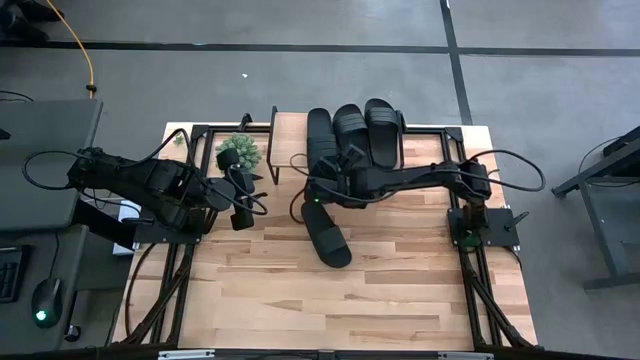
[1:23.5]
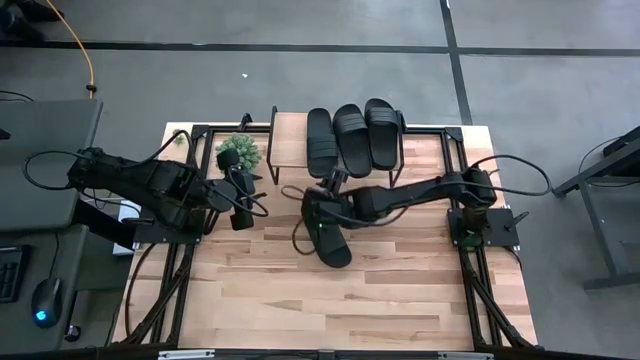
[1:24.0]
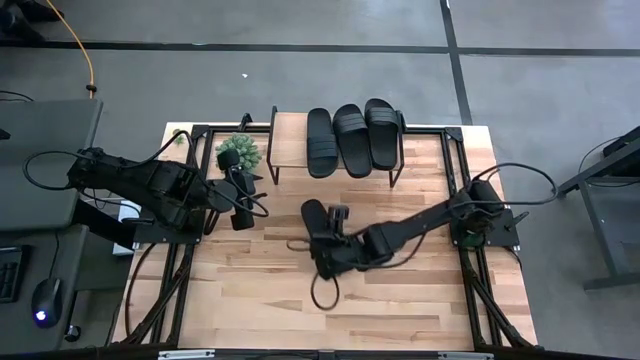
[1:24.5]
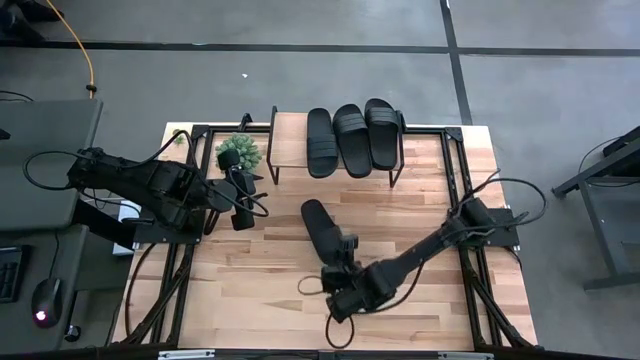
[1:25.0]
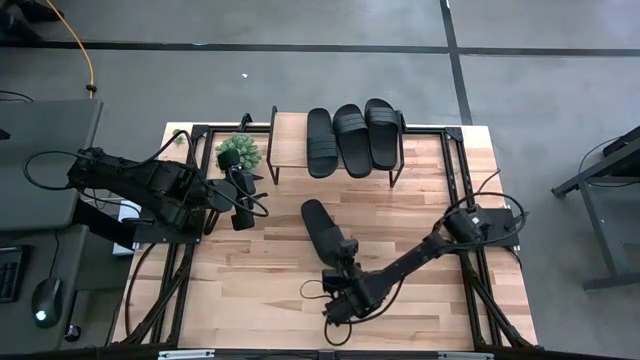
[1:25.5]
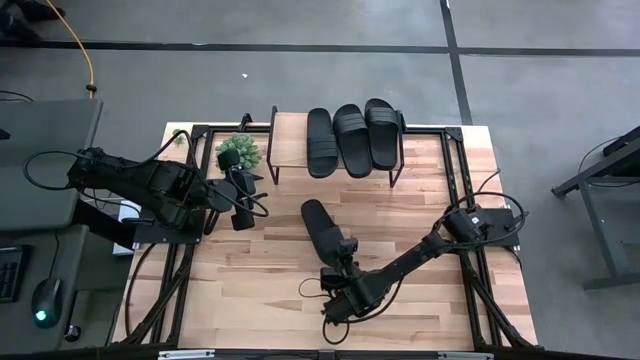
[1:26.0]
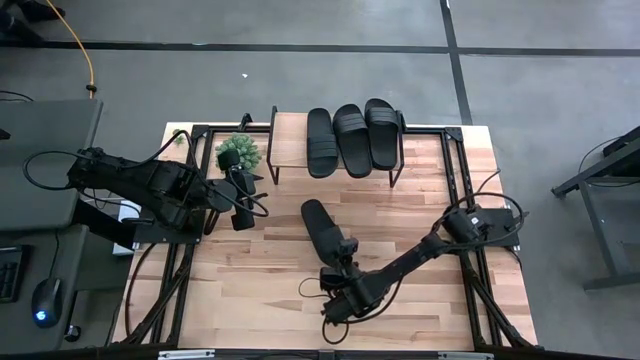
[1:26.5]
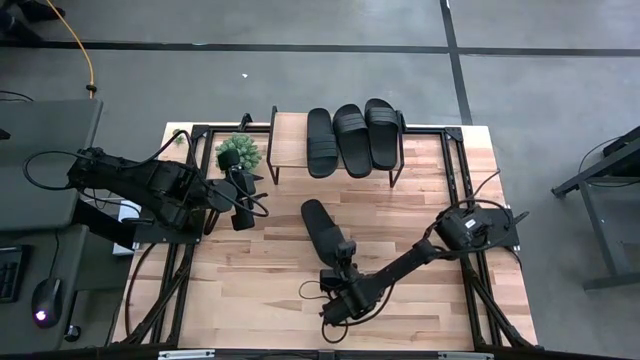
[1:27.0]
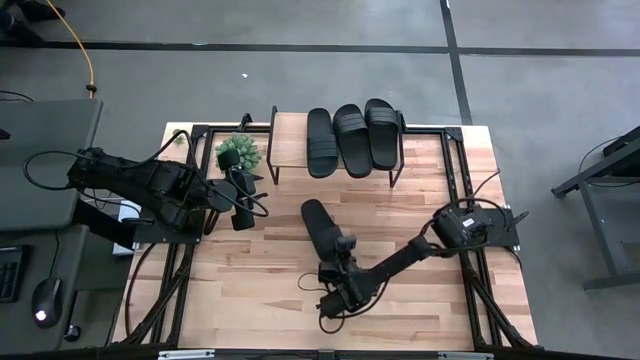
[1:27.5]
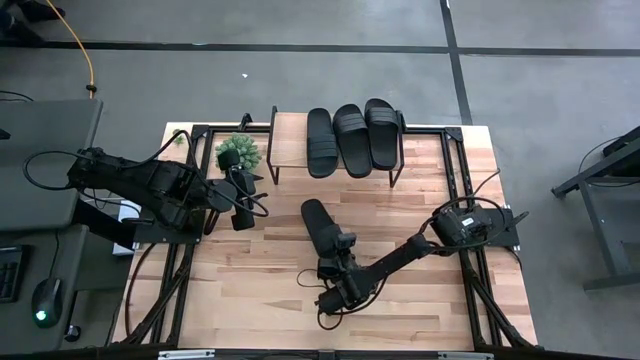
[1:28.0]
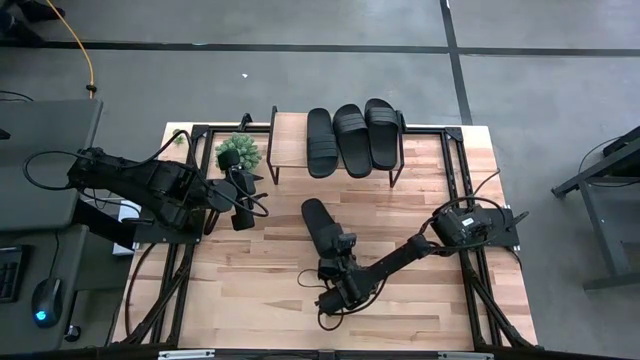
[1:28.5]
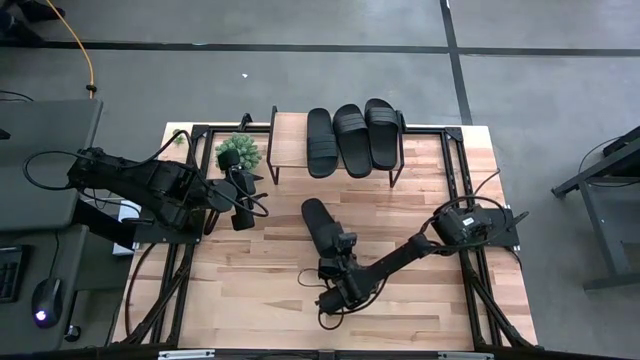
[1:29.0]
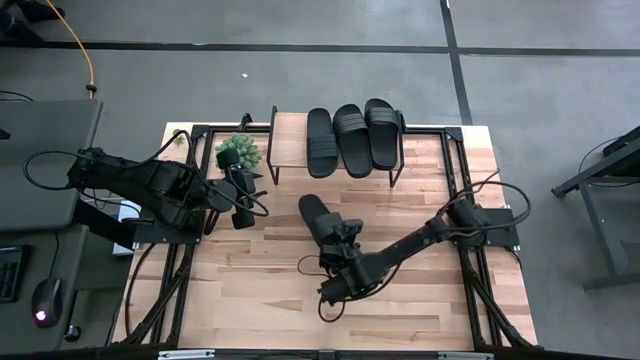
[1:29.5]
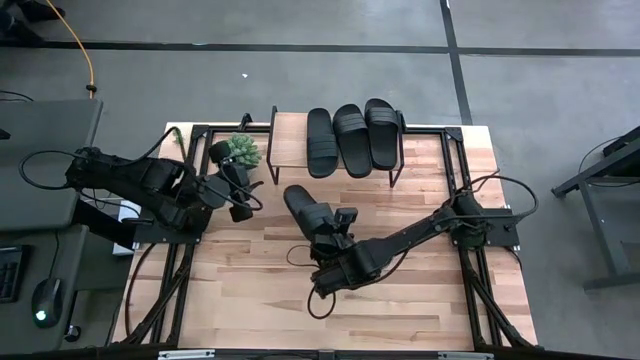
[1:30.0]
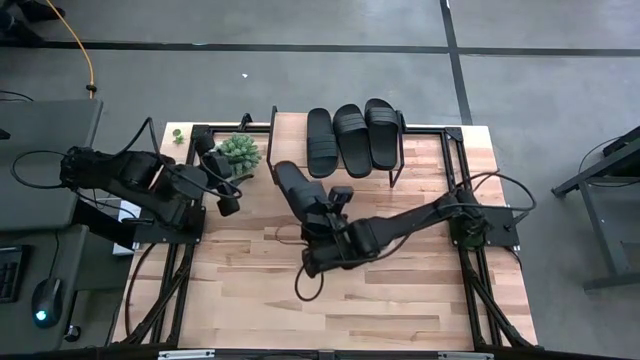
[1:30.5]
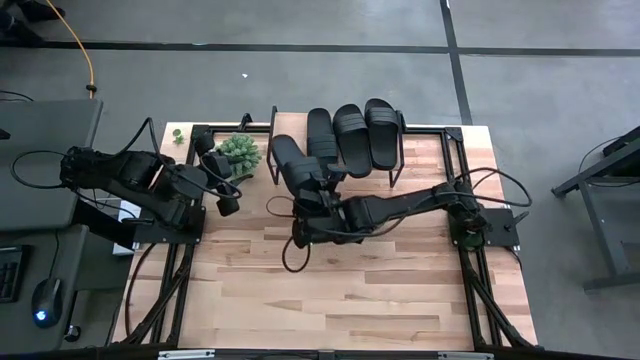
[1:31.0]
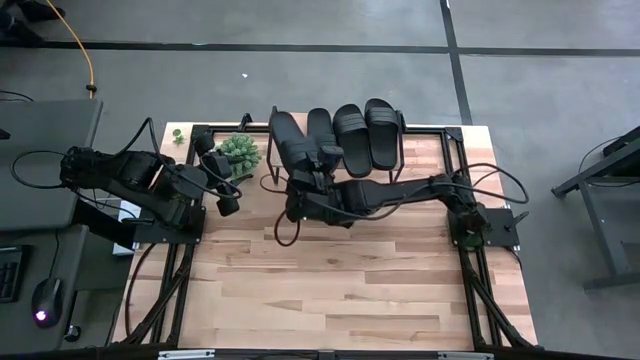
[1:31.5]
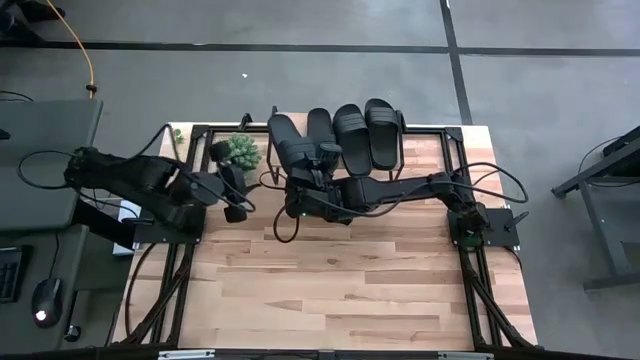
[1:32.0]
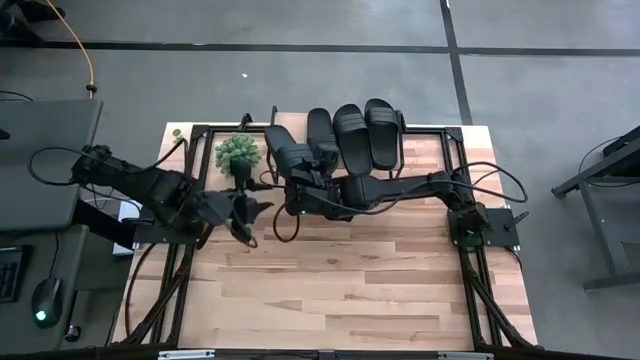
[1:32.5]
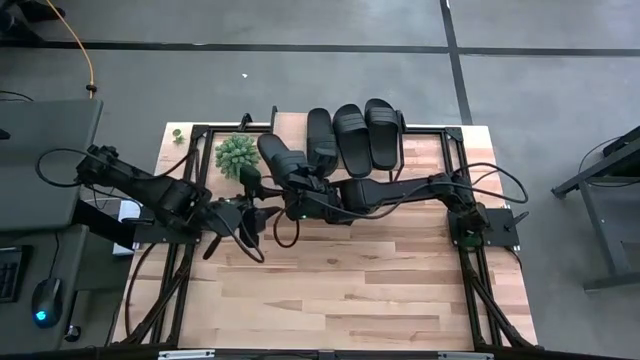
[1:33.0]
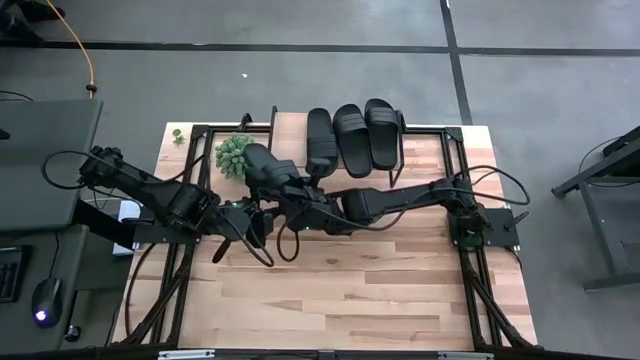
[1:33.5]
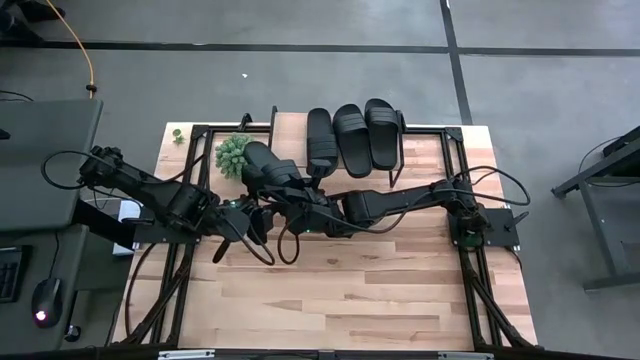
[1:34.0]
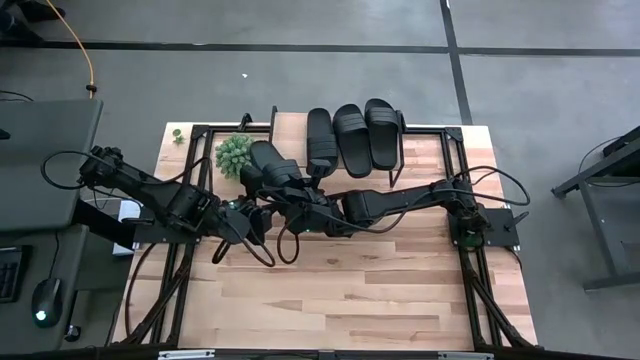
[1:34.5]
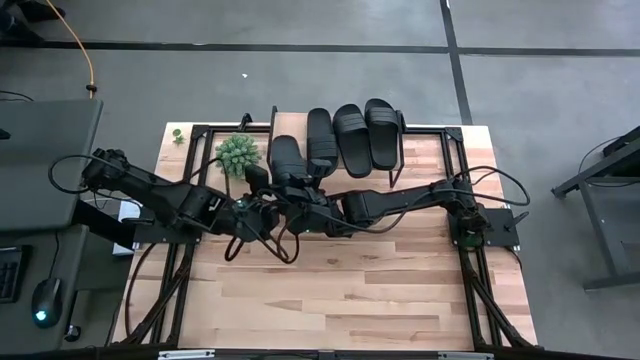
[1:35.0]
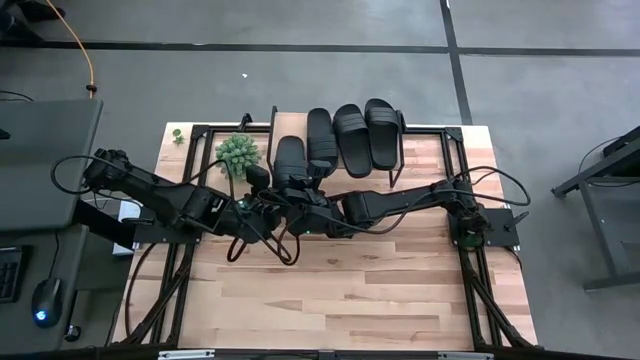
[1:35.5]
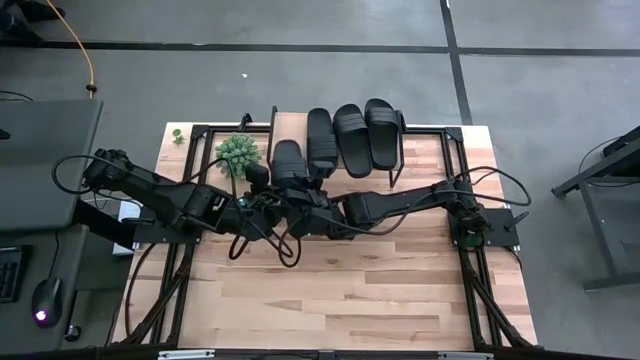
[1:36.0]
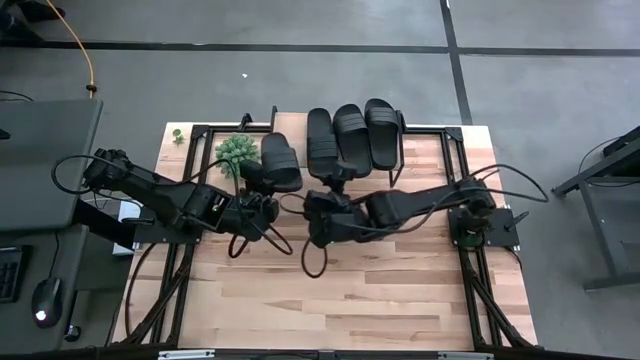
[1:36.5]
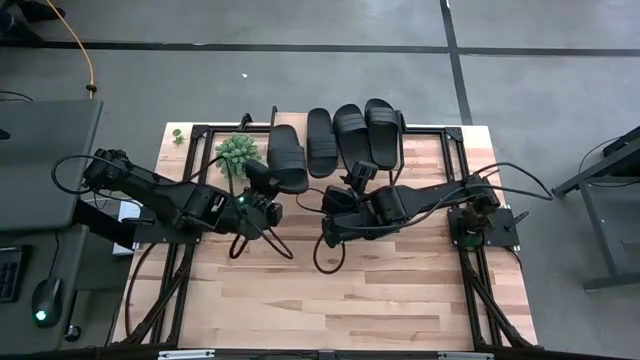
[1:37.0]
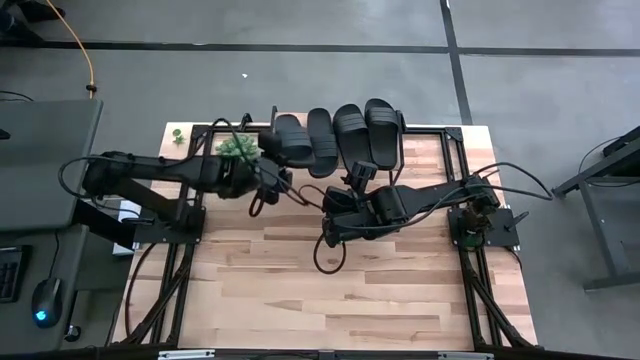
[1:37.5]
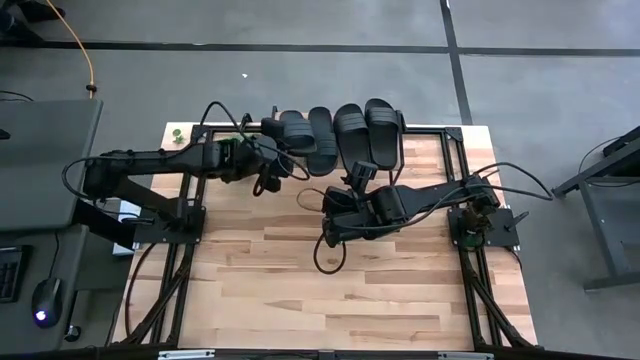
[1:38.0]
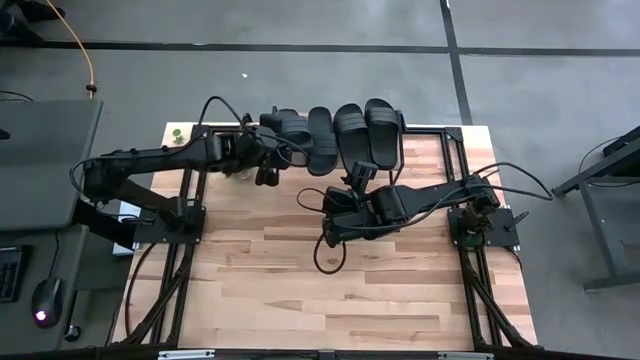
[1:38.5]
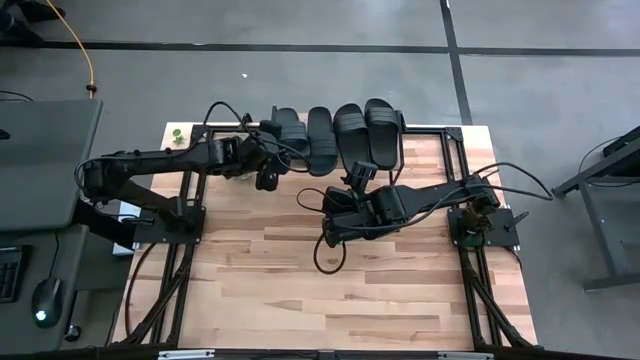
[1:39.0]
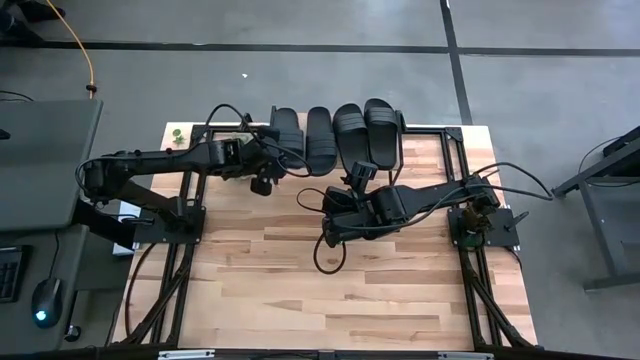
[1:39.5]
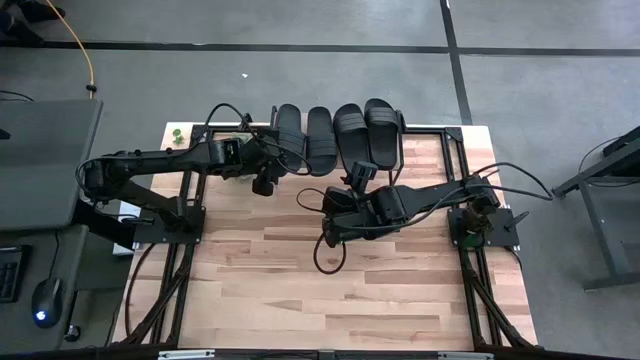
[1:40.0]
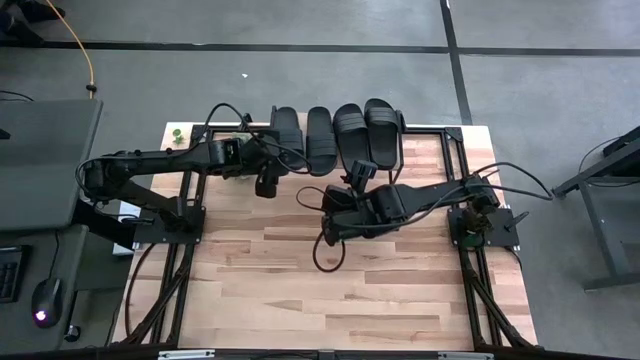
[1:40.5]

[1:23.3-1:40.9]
Task: Pick and place slides into the shelf
Put the black slide on the shelf
